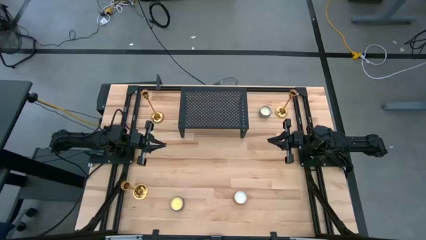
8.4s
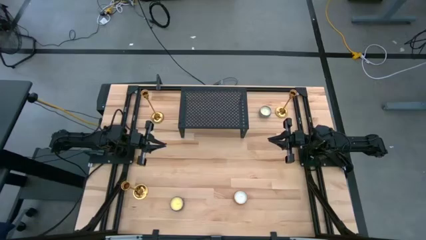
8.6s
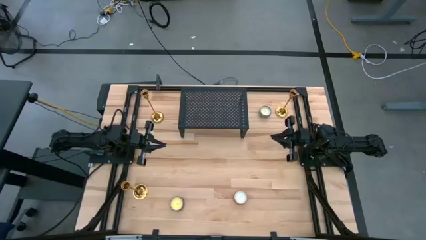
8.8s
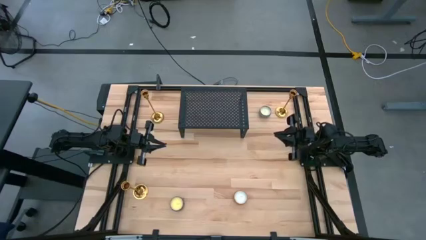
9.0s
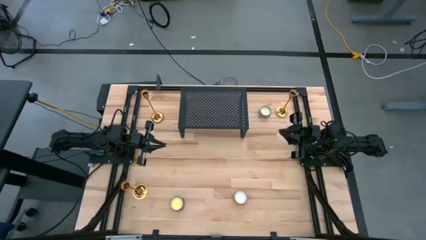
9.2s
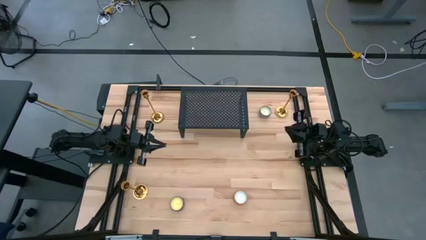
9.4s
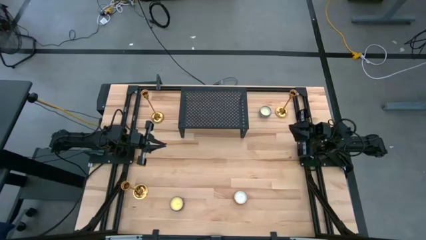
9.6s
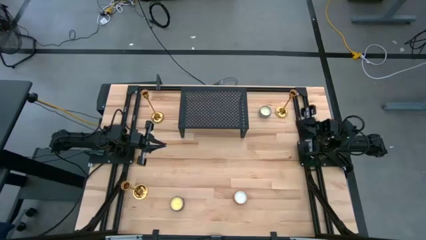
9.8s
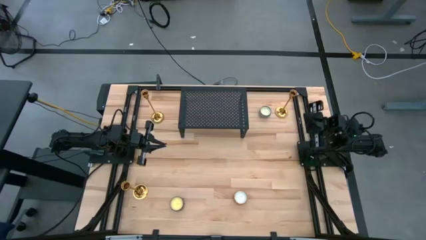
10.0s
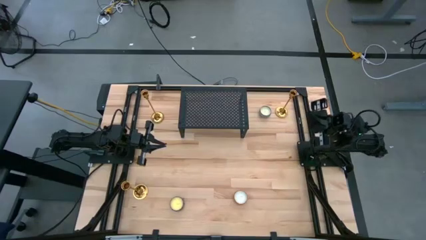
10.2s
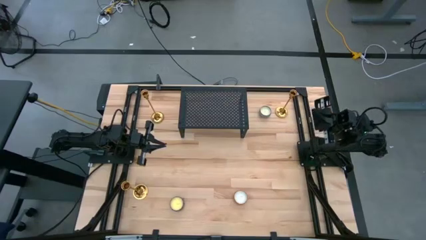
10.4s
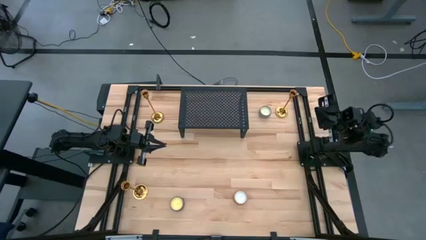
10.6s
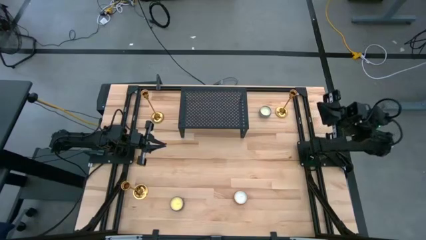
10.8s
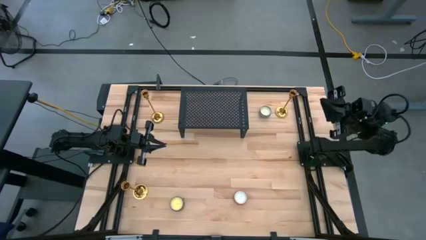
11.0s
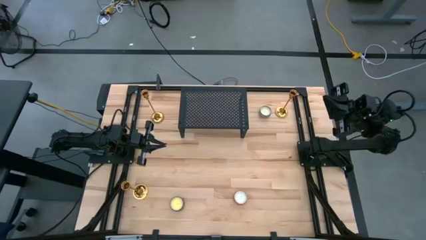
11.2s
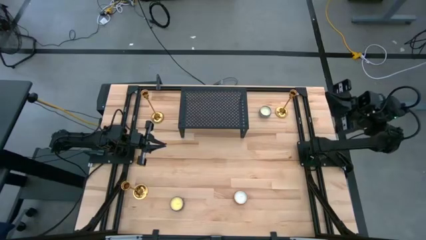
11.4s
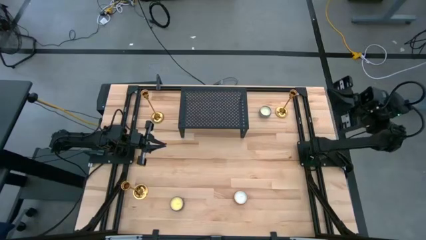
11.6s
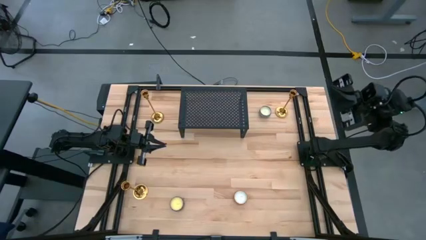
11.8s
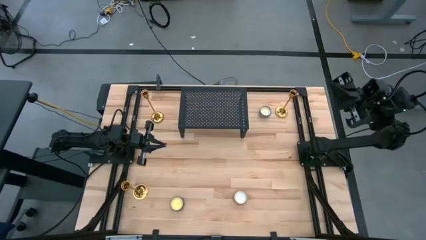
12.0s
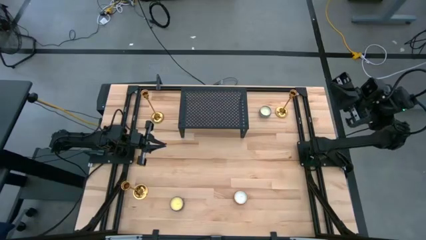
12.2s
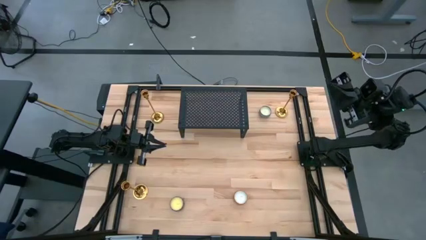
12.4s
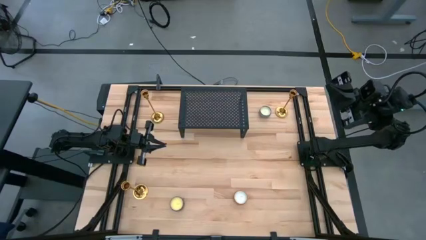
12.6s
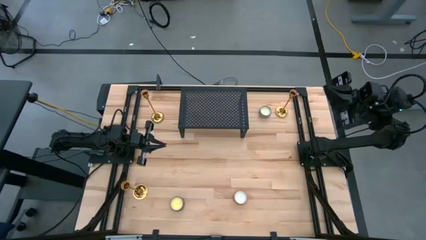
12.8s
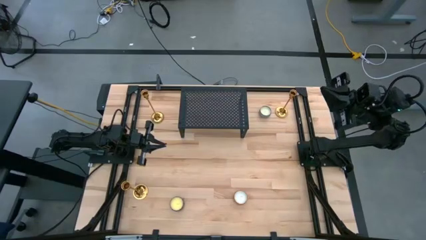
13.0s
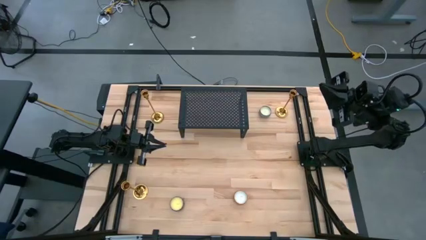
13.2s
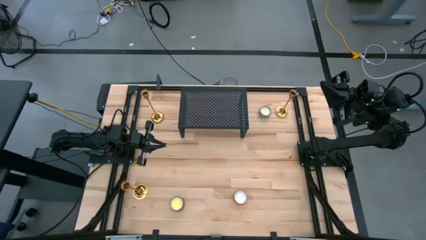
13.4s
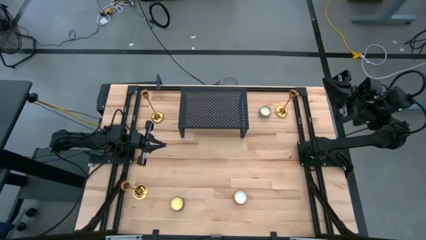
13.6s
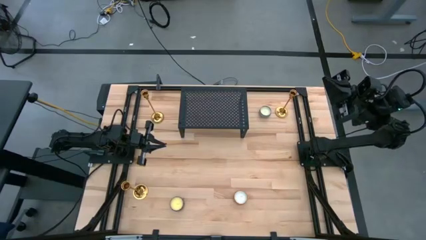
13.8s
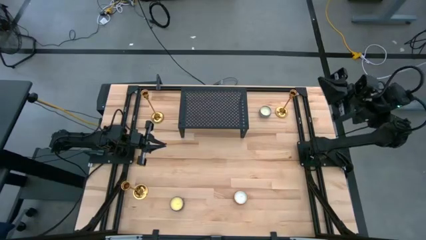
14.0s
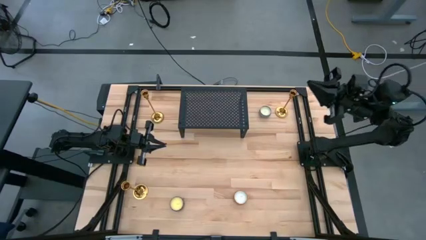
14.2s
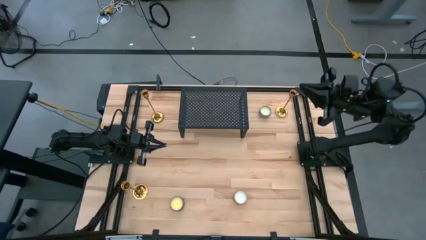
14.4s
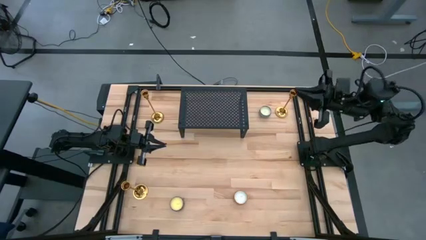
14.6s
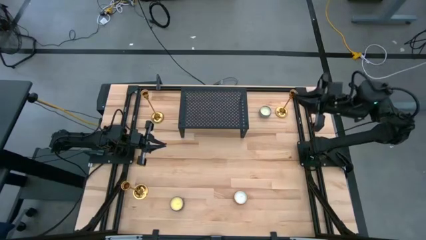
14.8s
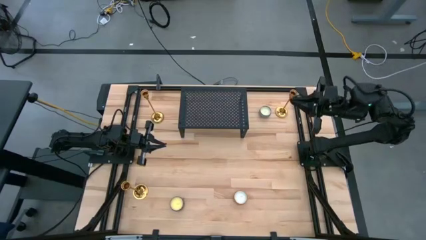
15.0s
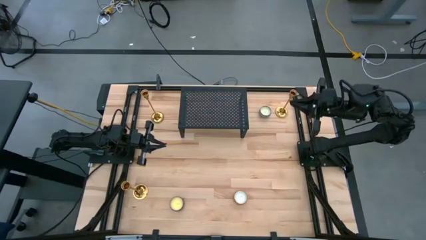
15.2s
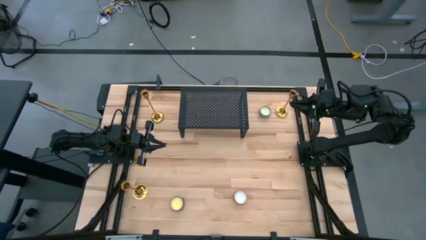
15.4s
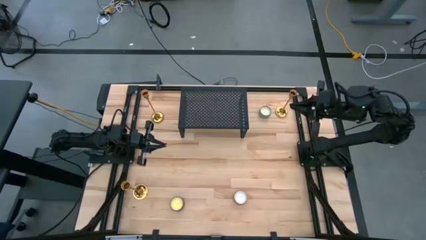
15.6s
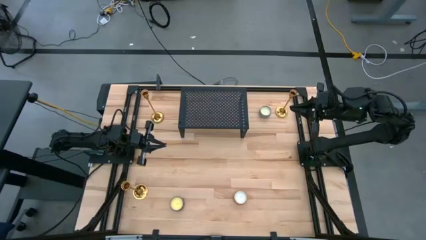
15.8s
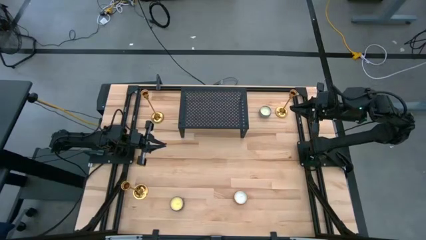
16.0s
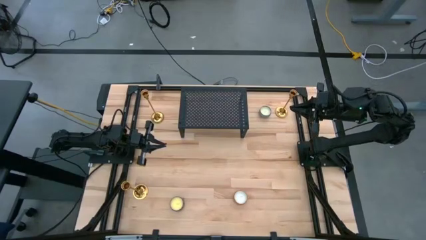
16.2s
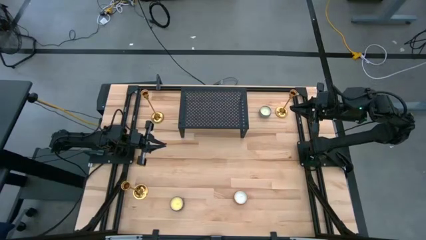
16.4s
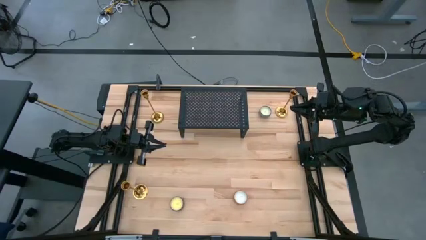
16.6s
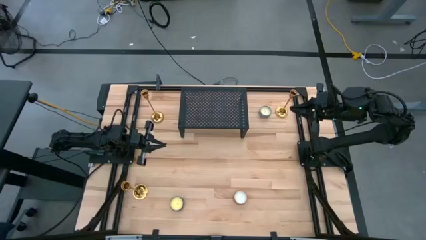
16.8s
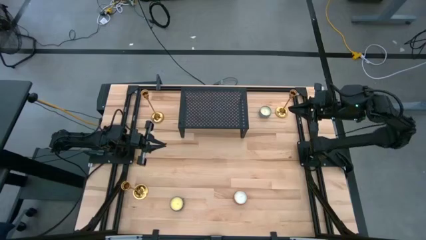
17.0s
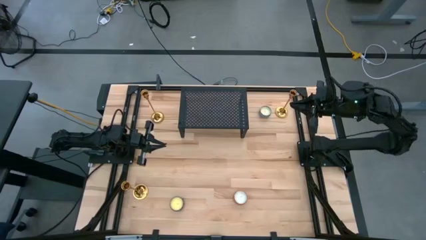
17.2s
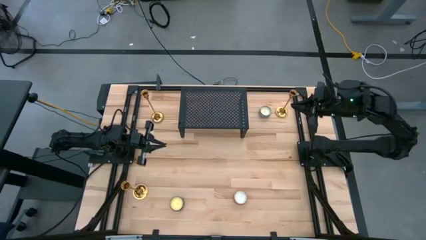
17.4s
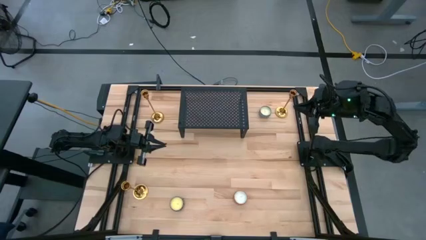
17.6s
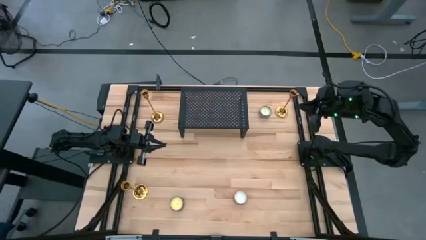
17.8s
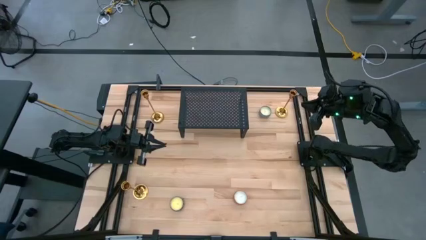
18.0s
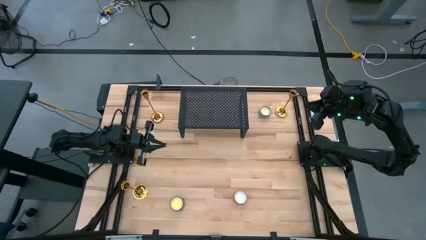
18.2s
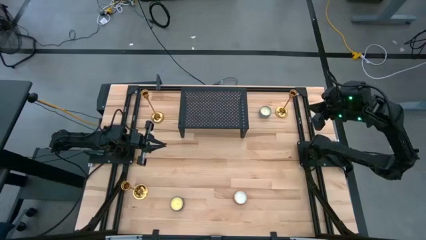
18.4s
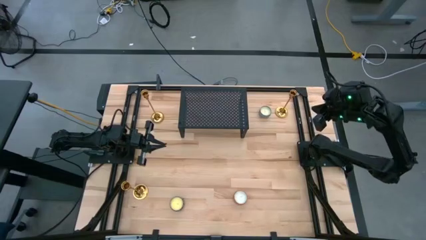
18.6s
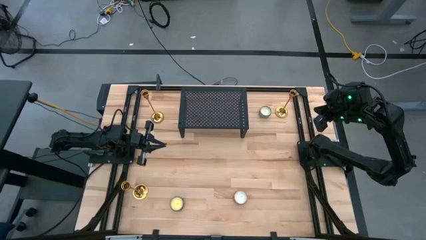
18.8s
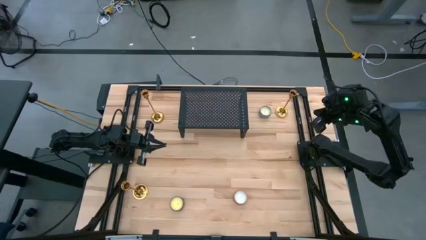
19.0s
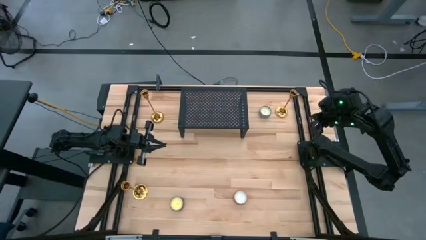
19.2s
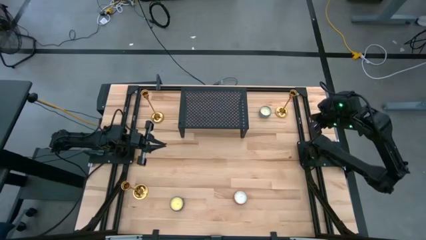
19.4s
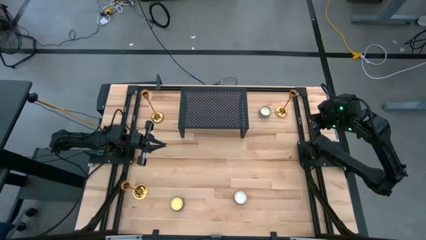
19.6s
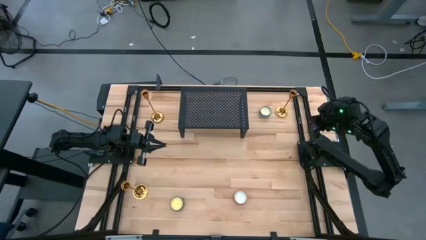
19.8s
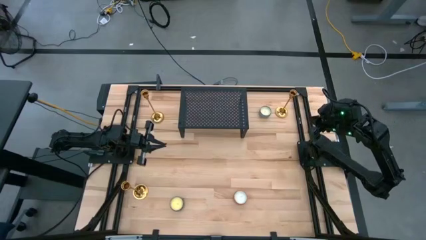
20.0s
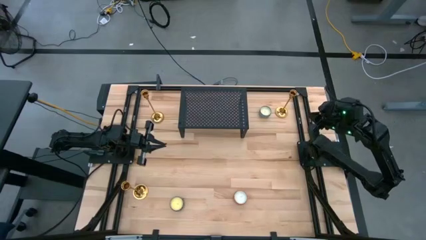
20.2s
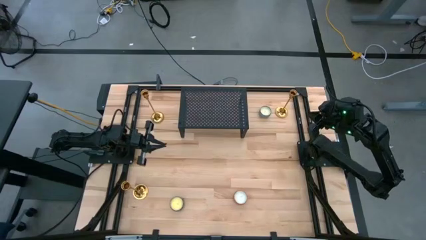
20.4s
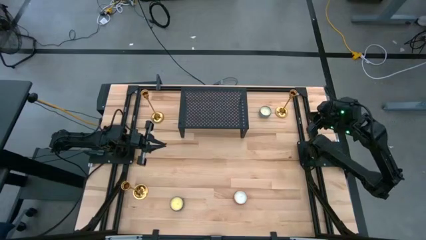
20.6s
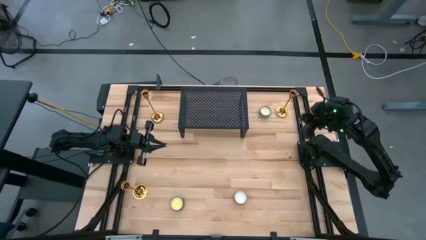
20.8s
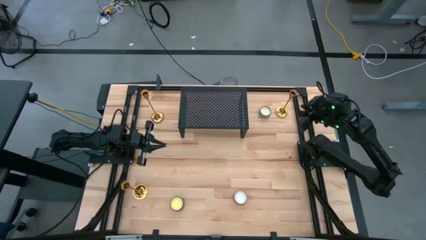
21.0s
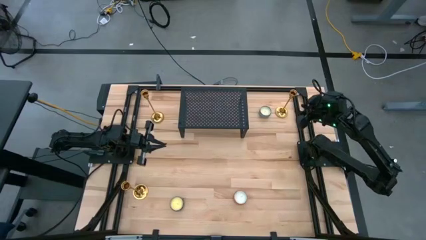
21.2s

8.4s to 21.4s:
Task: Pick & Place candle stick holders
Put the top right gold candle holder on the shelf
